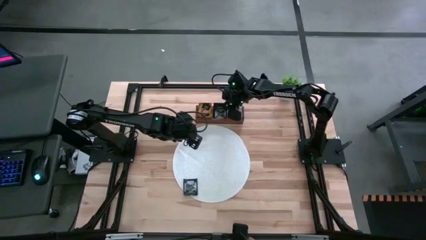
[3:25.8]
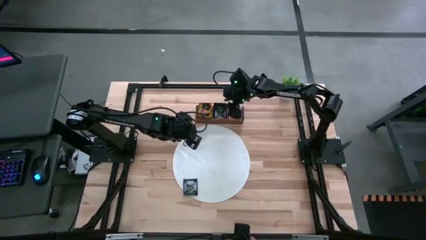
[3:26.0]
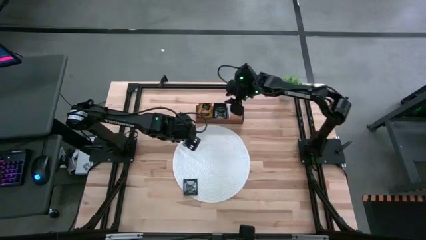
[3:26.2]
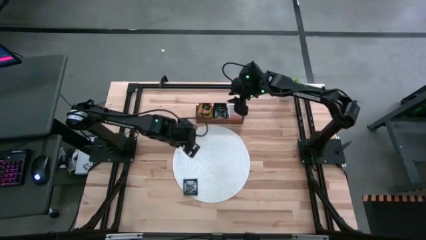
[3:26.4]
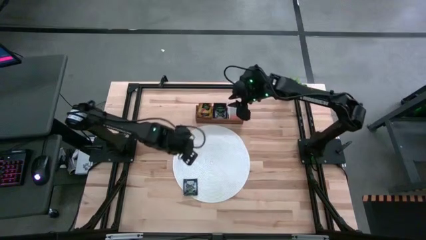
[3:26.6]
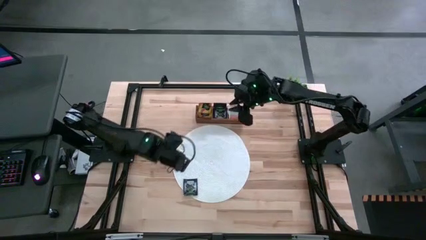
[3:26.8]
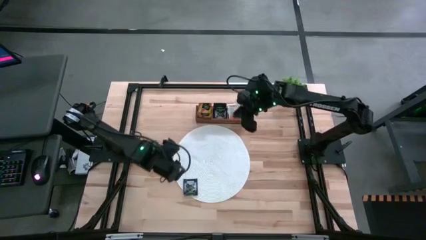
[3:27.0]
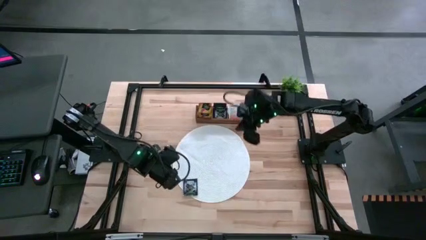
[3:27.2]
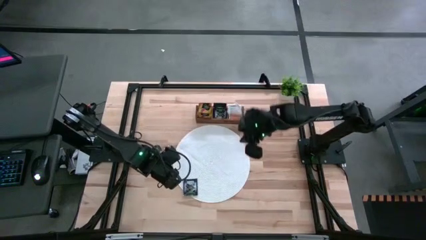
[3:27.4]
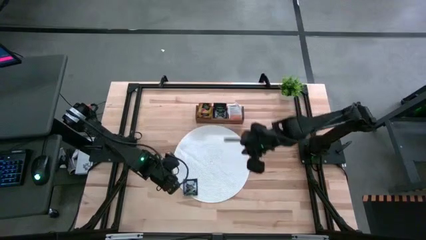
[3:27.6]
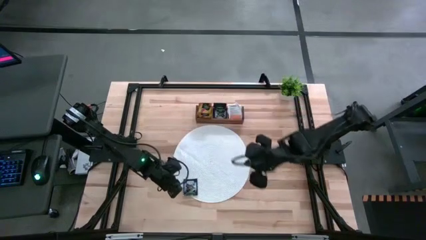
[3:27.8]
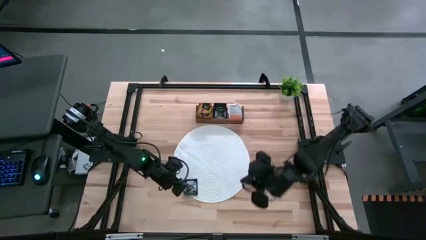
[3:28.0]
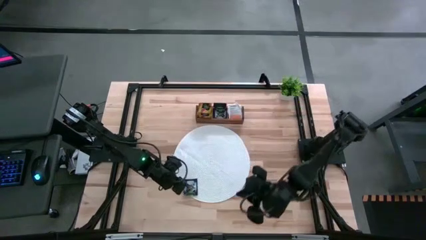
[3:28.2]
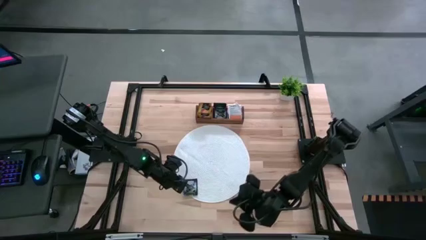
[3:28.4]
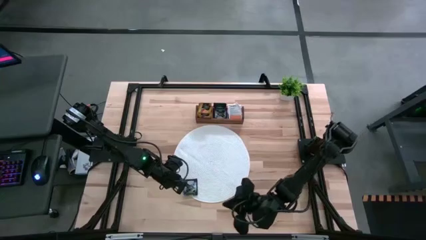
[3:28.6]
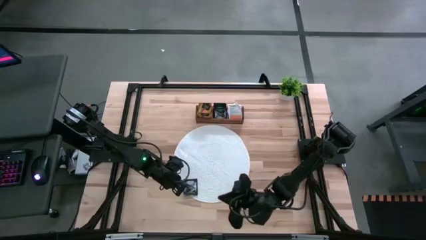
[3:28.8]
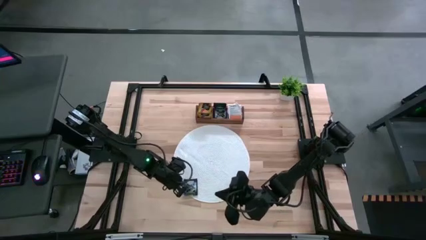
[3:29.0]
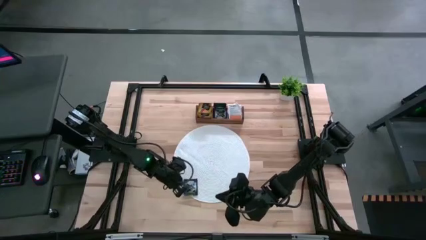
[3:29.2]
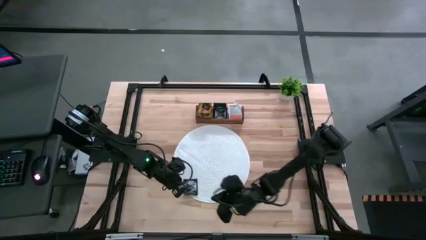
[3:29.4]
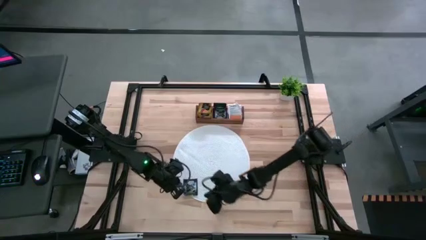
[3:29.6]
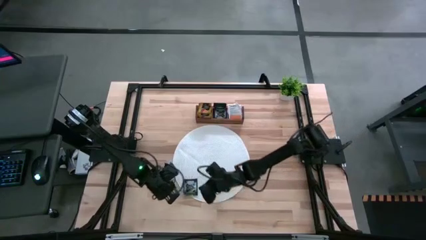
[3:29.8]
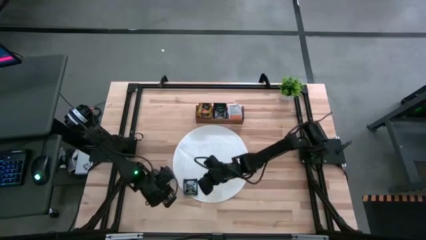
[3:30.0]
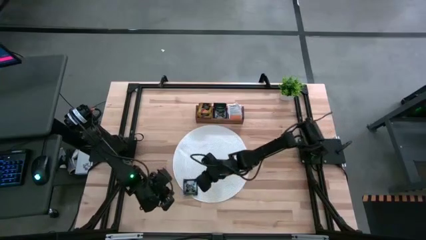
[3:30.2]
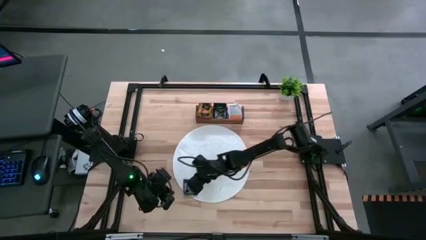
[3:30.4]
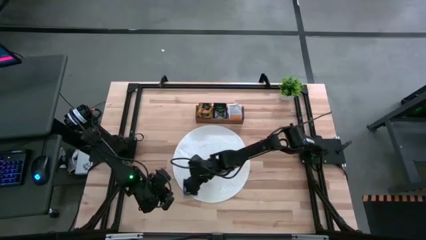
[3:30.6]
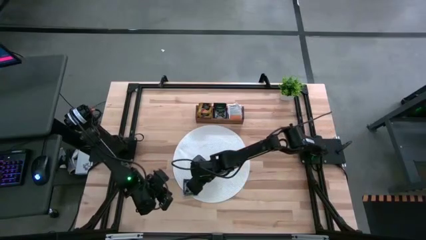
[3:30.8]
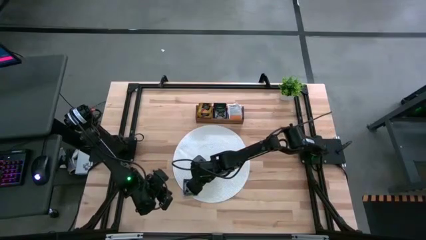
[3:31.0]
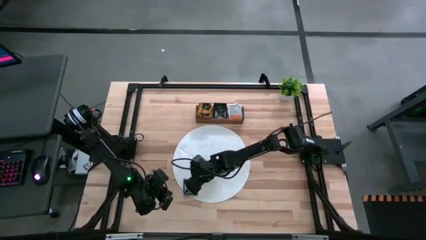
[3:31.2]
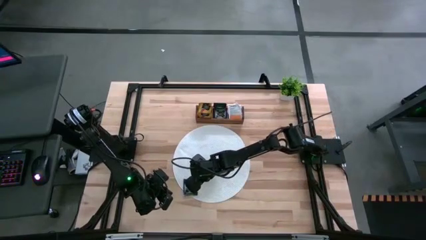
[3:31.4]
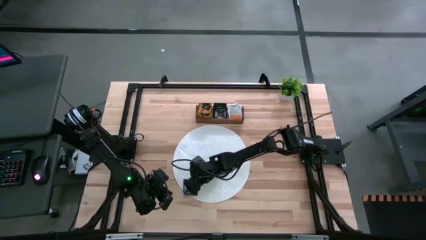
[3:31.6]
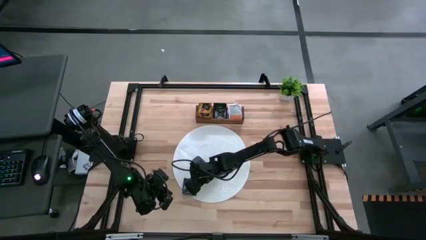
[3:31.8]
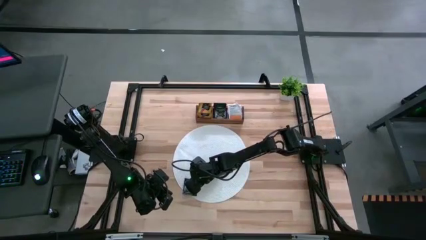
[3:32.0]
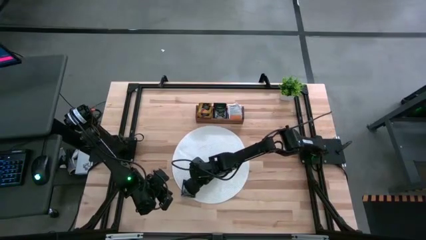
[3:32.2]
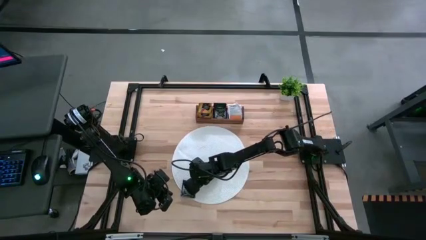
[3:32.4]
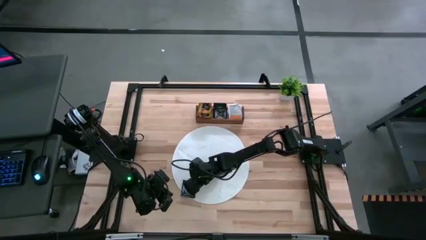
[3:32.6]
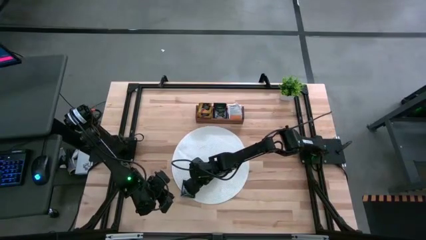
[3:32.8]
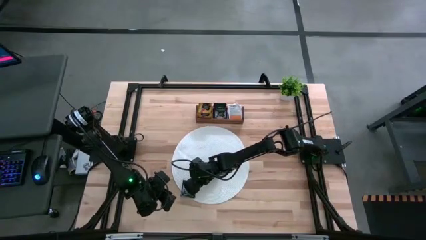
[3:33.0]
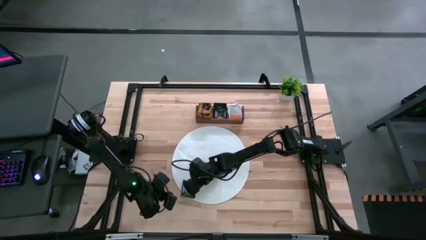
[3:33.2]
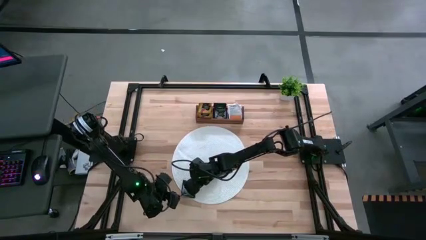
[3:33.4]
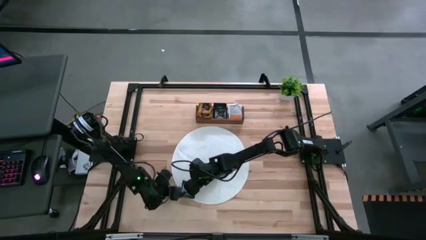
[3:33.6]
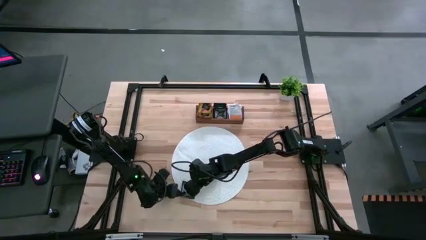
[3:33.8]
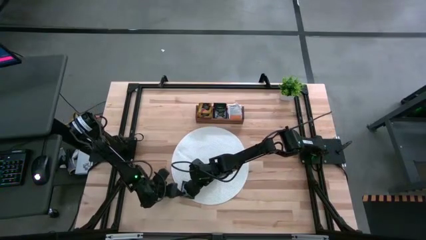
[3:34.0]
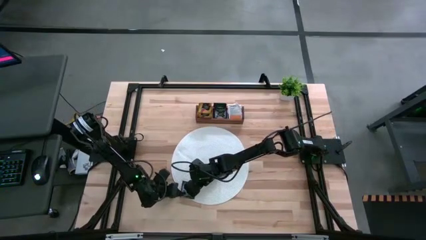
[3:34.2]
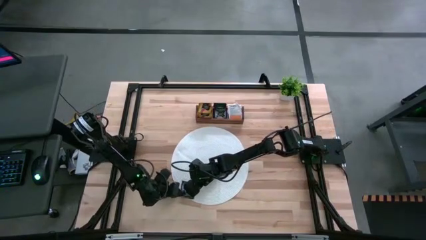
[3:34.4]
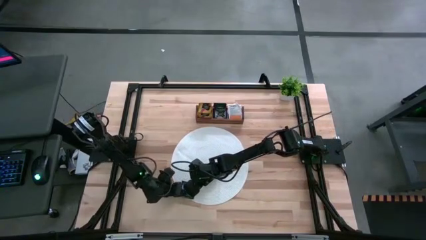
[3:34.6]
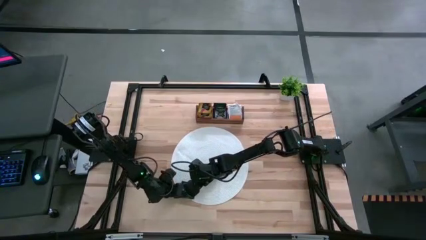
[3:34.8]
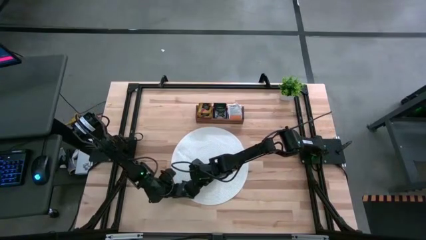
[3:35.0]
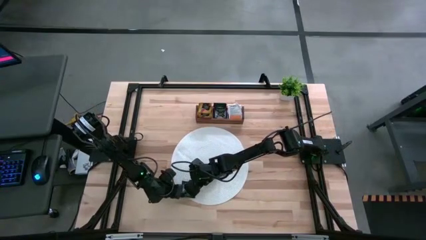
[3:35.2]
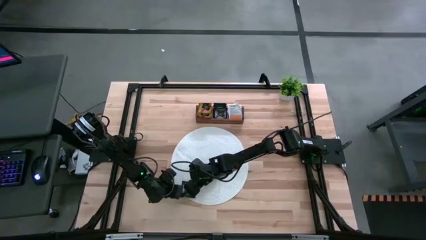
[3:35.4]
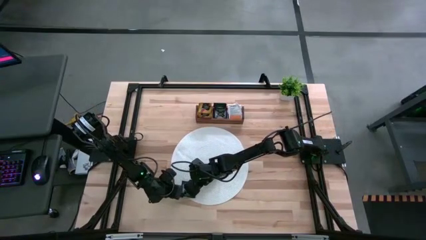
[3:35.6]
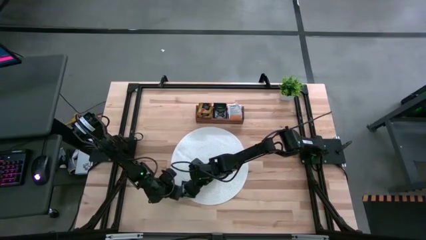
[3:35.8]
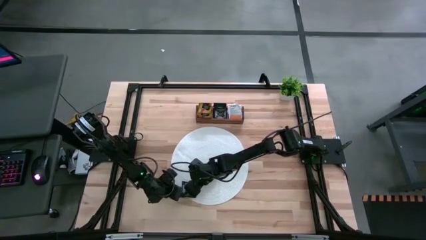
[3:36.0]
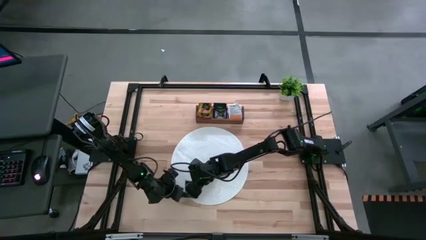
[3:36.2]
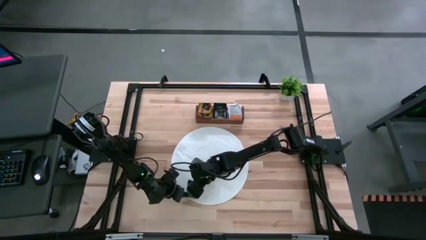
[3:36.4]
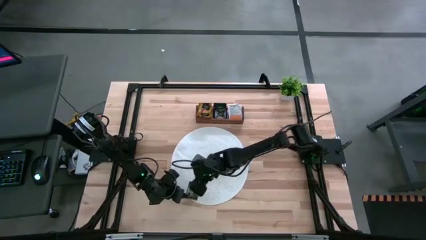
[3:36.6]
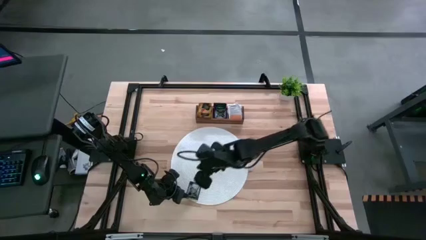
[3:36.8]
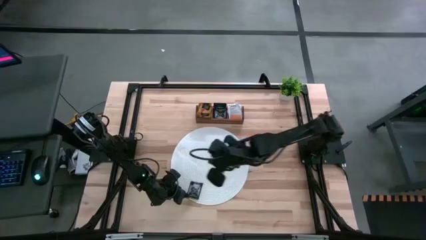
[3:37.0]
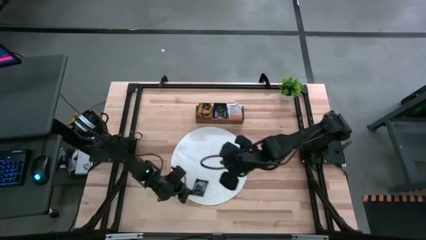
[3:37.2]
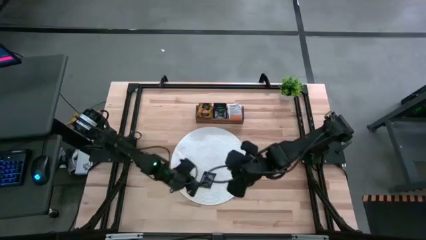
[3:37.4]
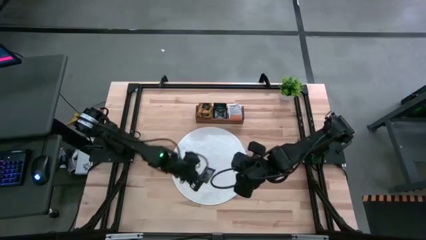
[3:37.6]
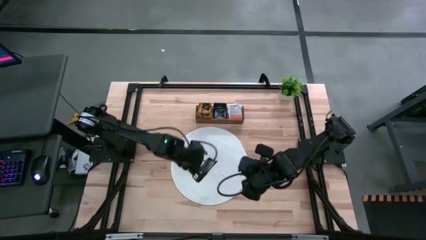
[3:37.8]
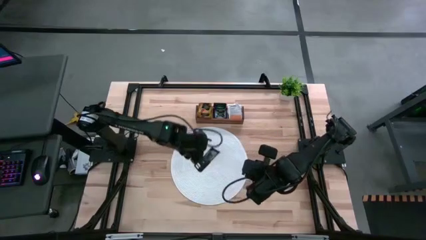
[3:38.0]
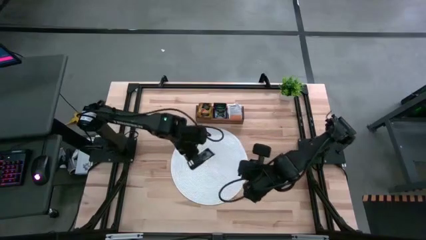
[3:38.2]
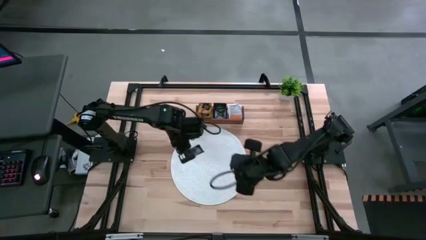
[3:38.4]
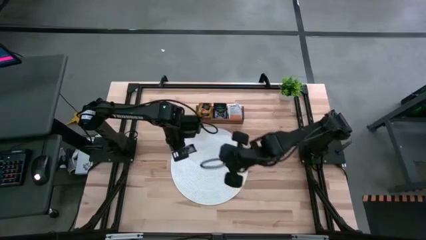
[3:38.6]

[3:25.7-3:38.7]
Task: Pick & Place Tea
Put the black tea bag into the middle section of the wooden organizer
